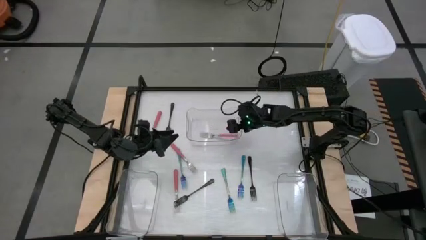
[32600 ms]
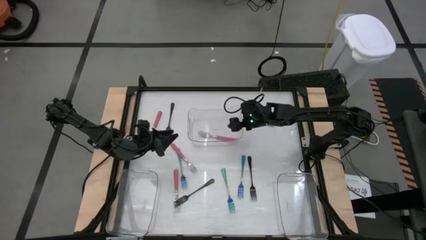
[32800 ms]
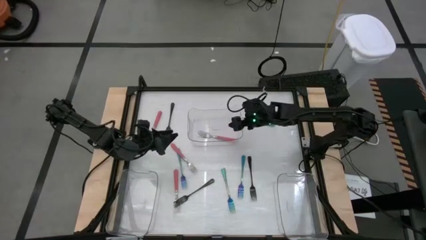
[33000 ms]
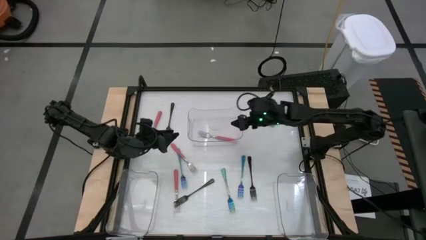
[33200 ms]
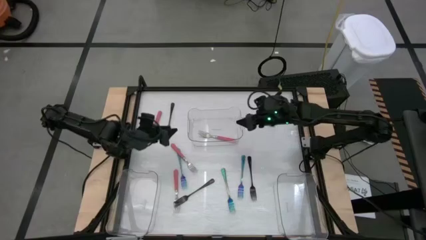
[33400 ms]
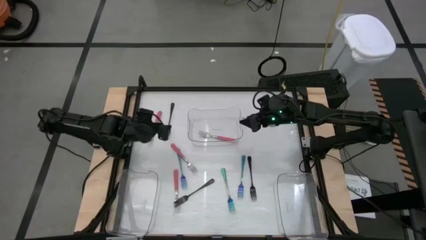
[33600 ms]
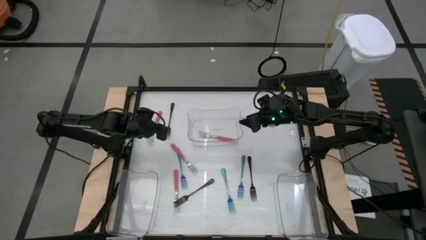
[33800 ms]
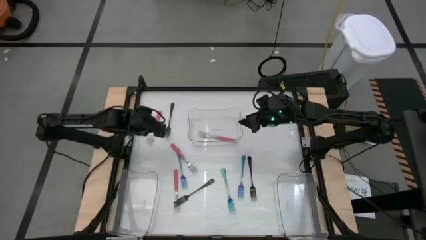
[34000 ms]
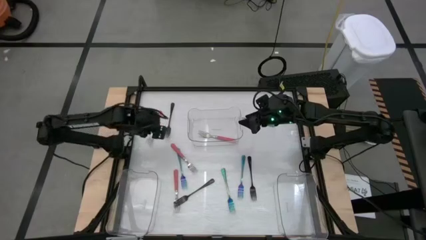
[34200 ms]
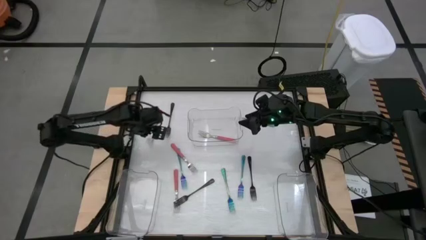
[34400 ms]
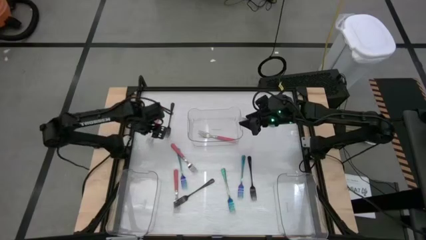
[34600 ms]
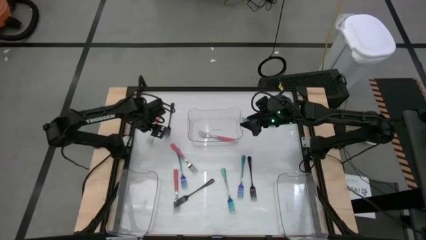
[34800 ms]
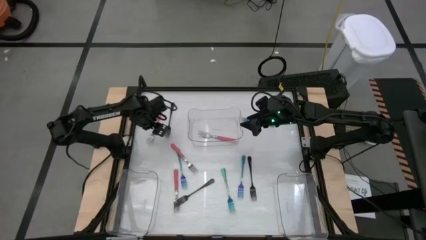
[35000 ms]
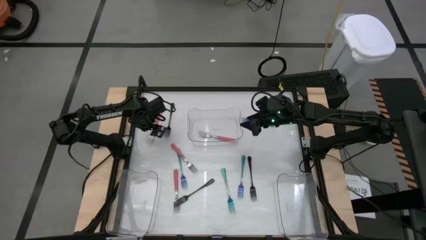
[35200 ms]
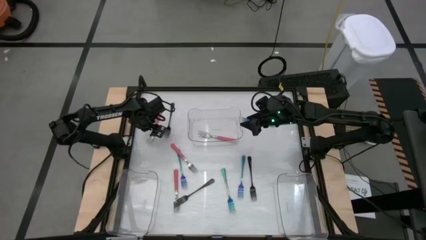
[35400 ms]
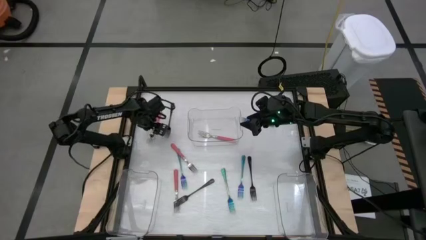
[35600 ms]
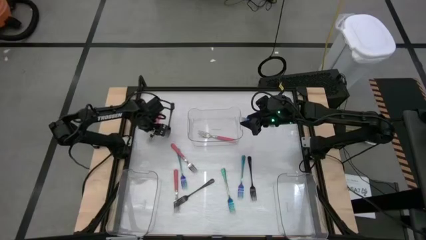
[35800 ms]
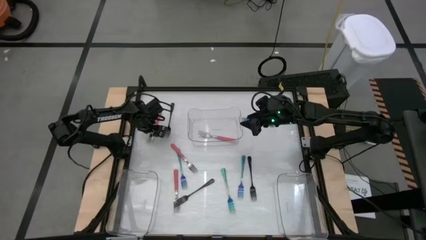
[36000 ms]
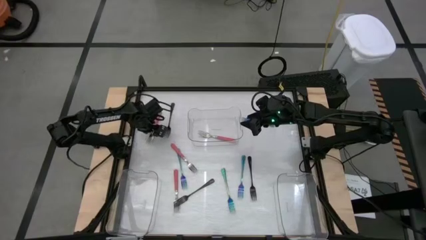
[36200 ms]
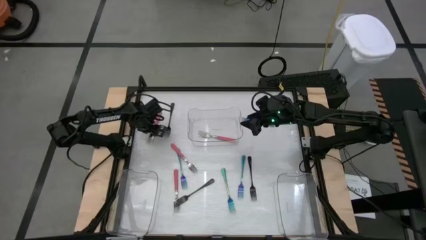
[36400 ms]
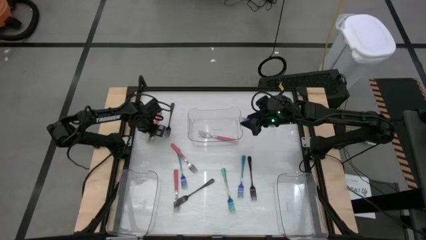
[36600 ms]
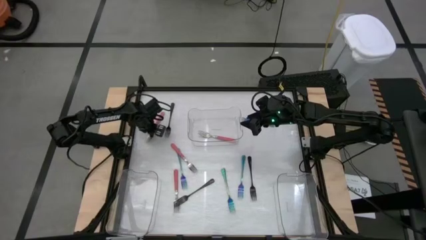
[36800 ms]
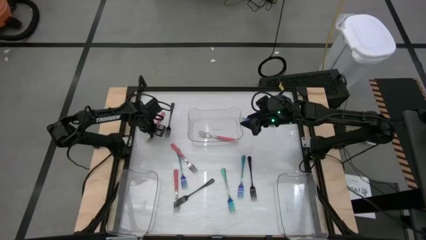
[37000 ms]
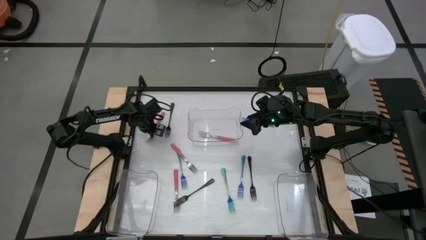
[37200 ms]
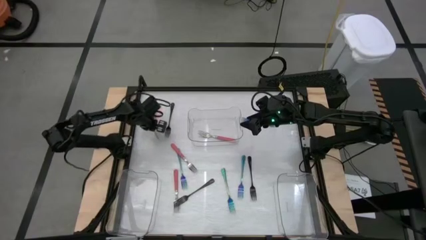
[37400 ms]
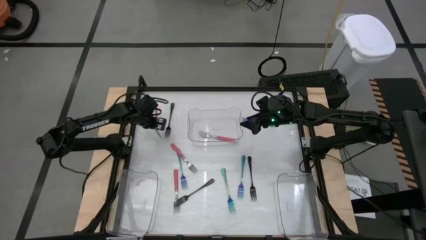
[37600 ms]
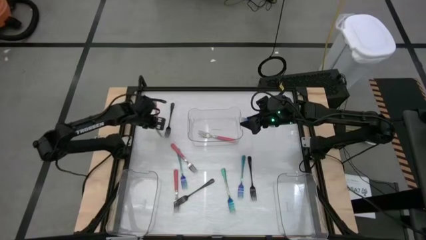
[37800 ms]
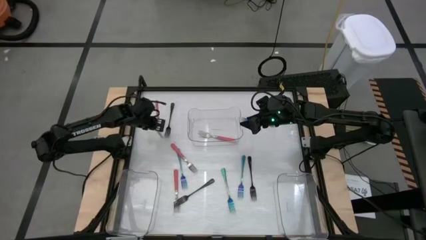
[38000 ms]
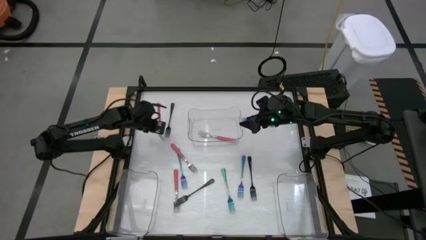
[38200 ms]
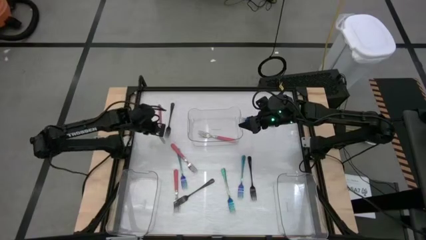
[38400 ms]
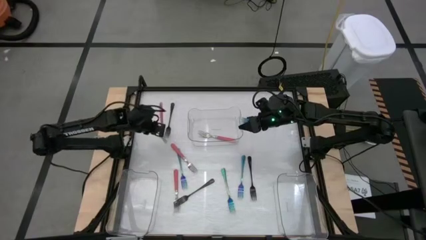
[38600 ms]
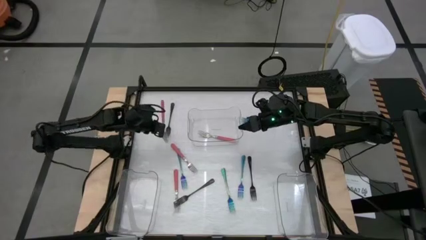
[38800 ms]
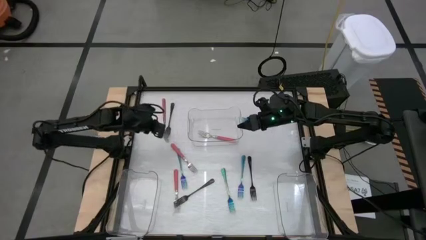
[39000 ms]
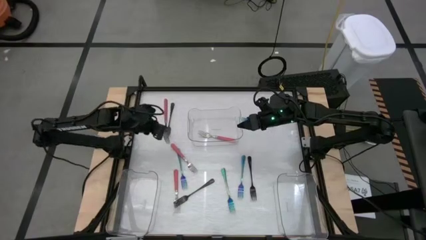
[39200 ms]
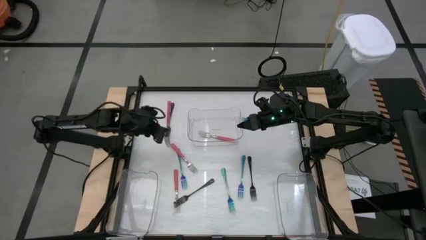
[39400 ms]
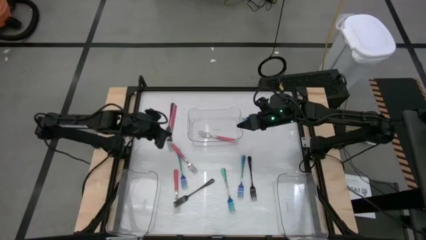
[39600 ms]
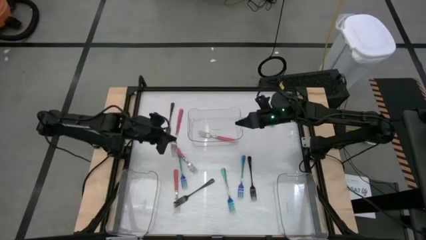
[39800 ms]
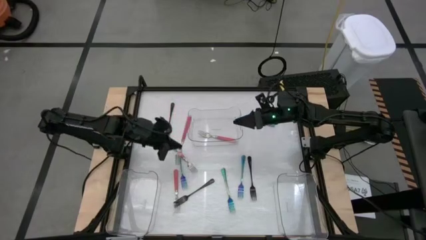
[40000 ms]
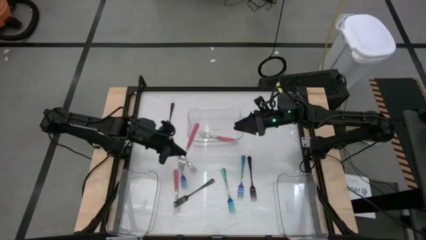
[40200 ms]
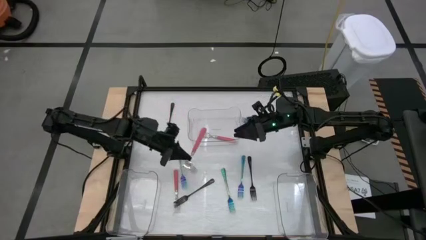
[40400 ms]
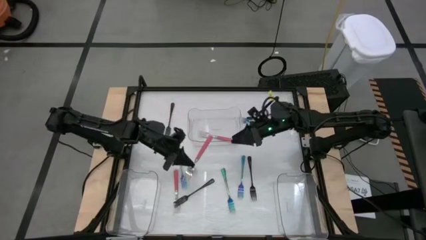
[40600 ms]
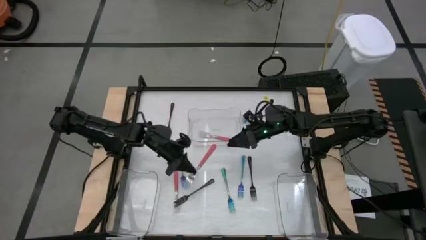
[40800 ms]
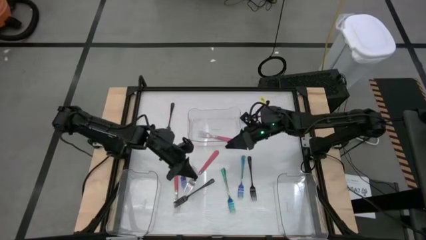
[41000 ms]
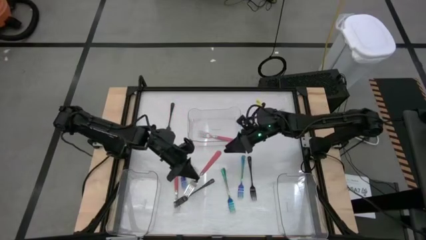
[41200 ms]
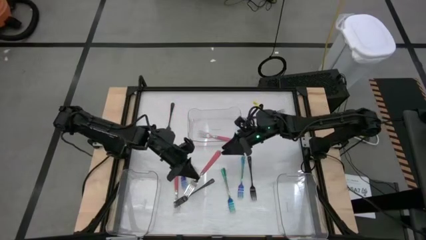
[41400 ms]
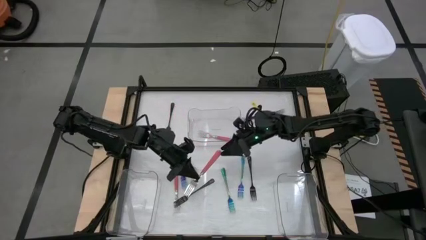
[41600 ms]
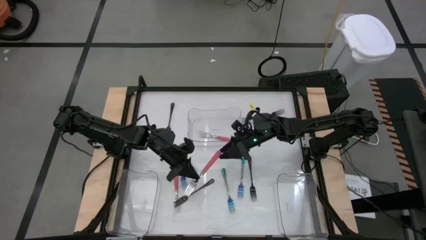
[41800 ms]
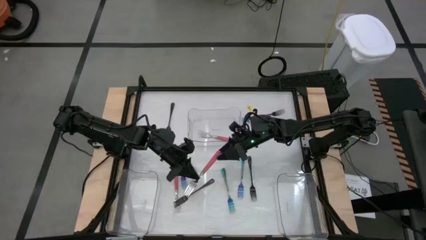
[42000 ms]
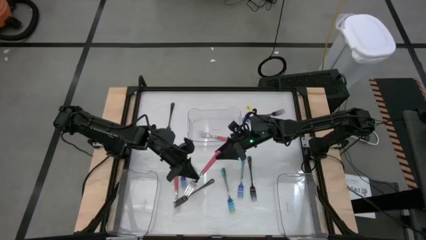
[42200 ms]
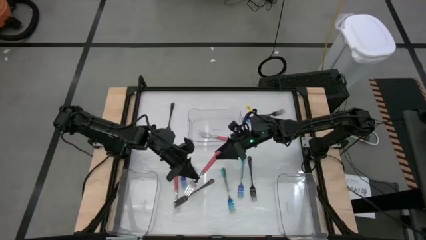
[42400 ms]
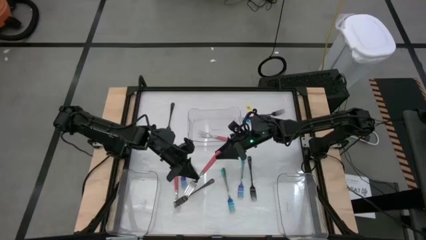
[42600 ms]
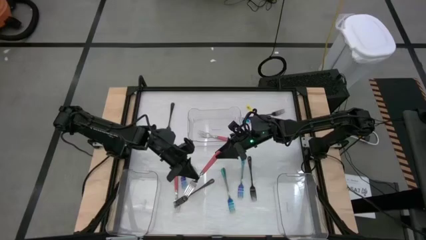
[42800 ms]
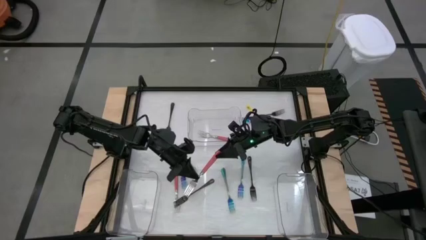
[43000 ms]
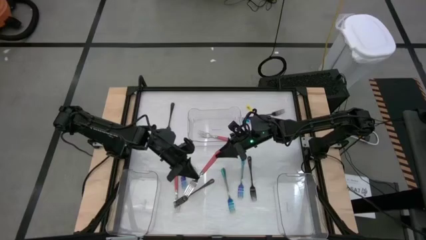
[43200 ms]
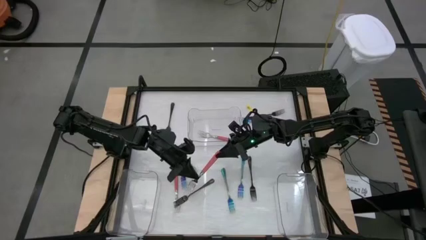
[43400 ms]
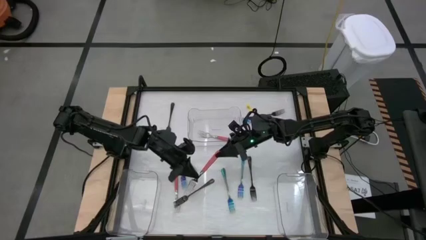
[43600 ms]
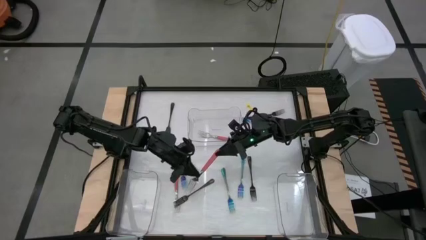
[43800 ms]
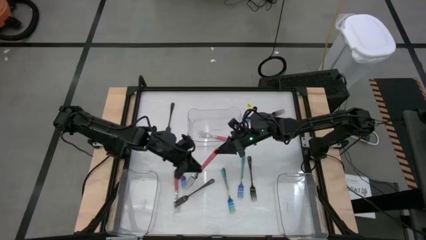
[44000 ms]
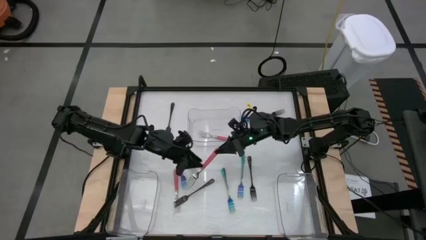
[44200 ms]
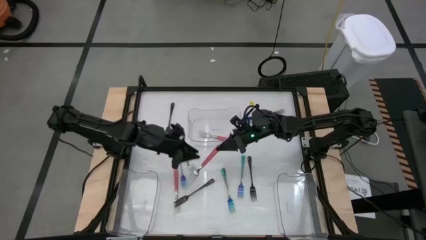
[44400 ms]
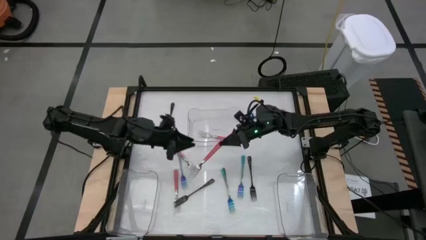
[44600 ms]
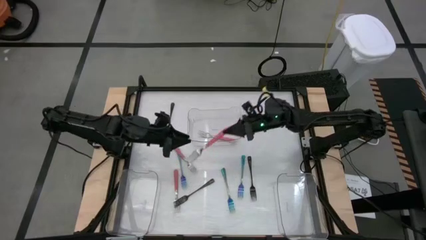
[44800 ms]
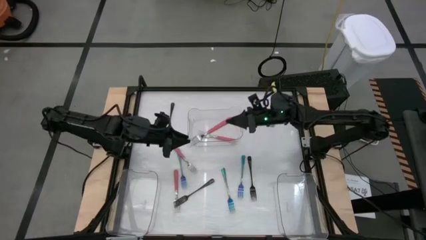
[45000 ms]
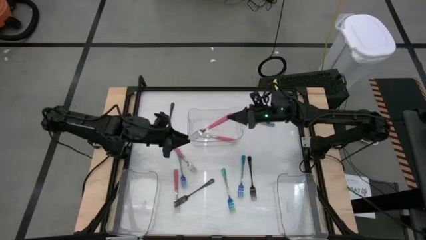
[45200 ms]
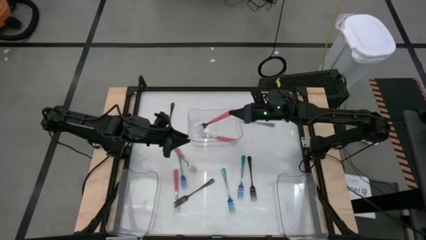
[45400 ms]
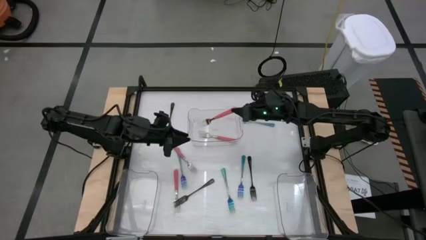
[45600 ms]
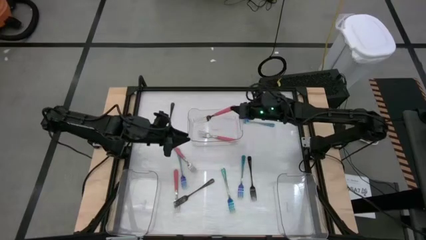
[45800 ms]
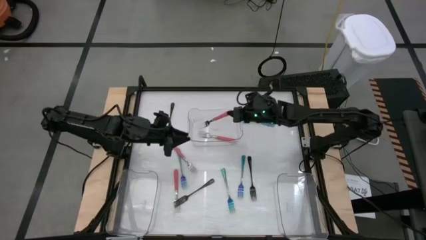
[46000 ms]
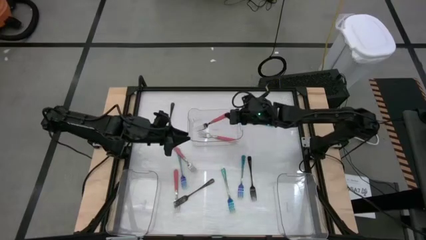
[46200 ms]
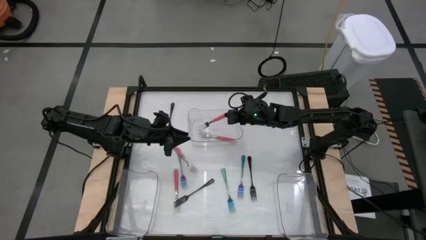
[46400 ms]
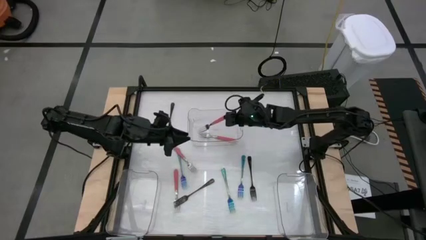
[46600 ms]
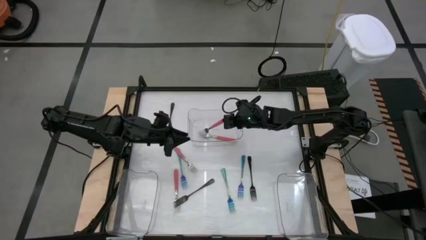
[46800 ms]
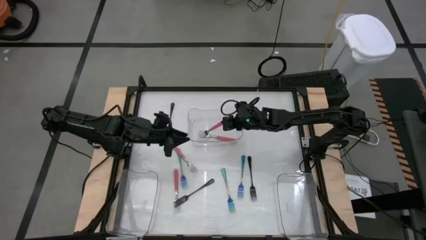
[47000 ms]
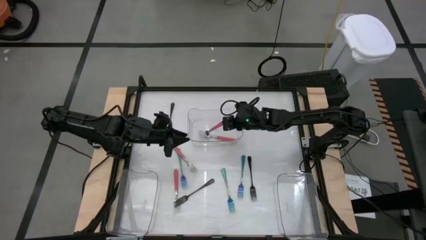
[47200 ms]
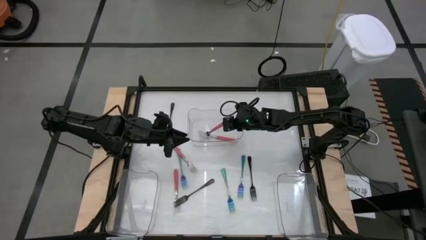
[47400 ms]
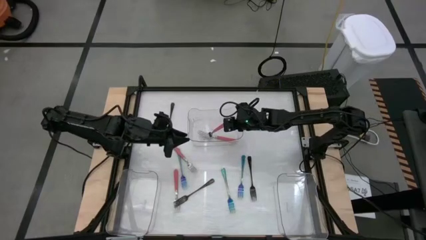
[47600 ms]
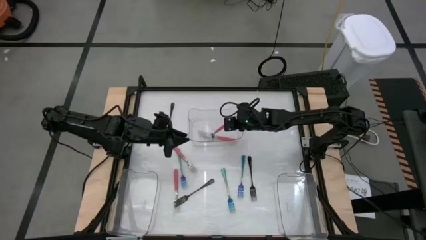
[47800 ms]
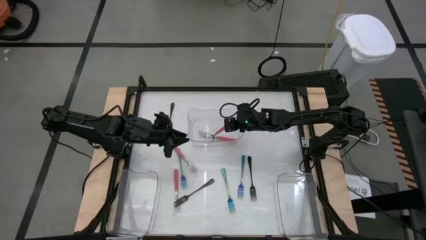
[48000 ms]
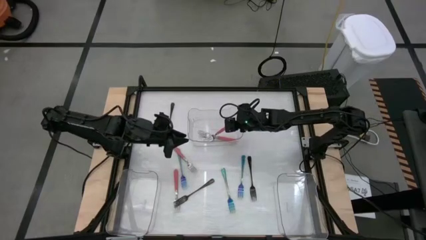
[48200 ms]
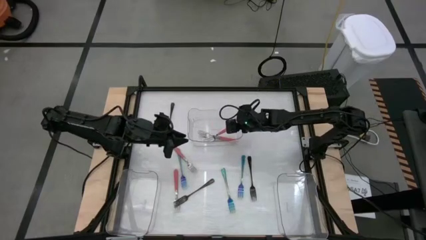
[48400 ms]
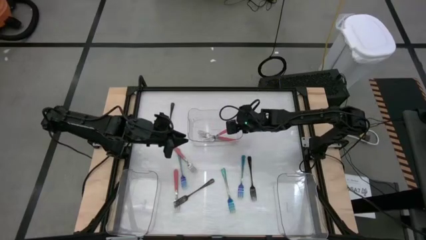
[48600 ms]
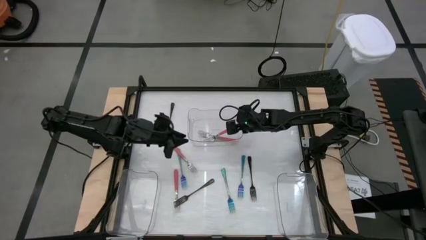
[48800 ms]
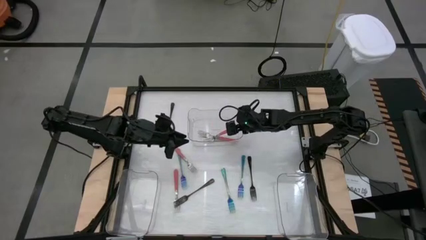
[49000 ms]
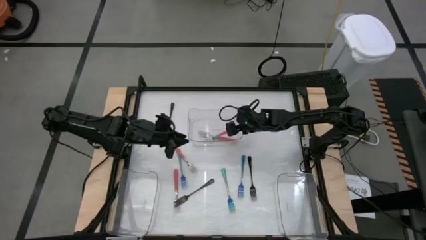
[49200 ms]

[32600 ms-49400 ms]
Task: Sort silverware by color (type)
Put the pink fork into the middle transparent bin
